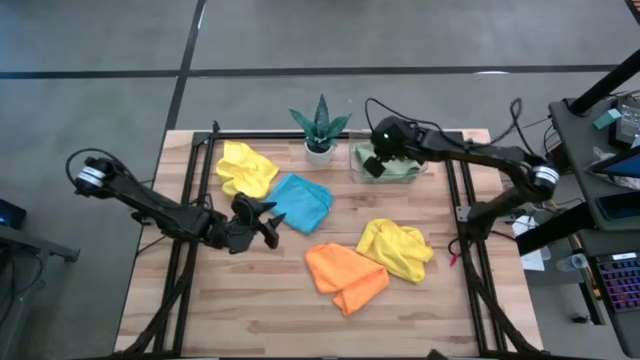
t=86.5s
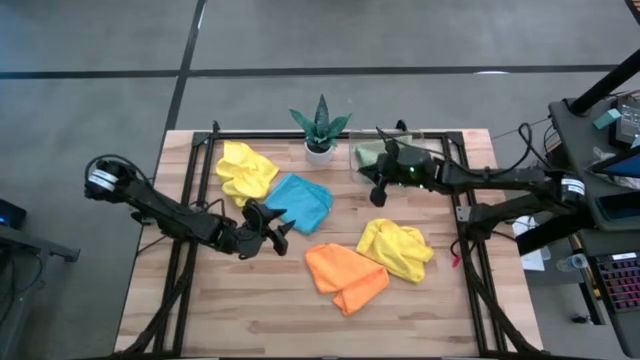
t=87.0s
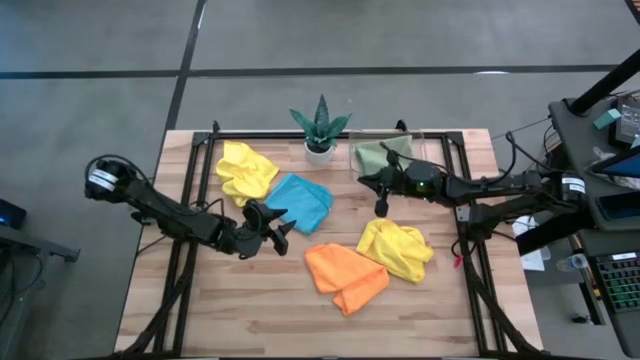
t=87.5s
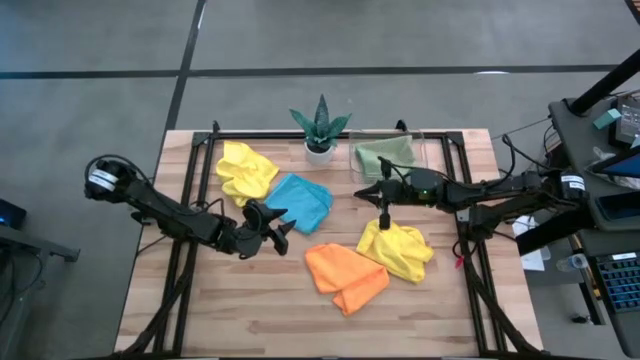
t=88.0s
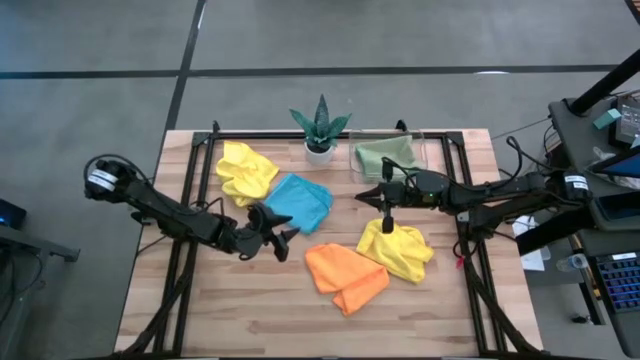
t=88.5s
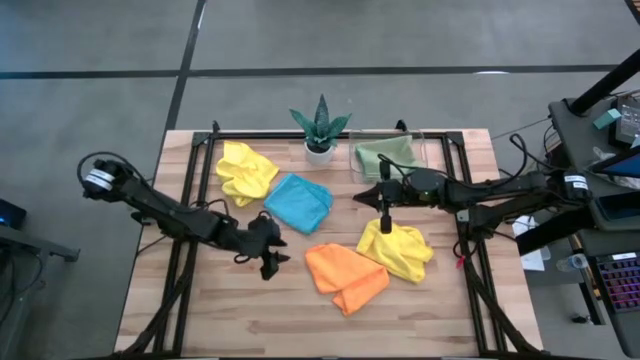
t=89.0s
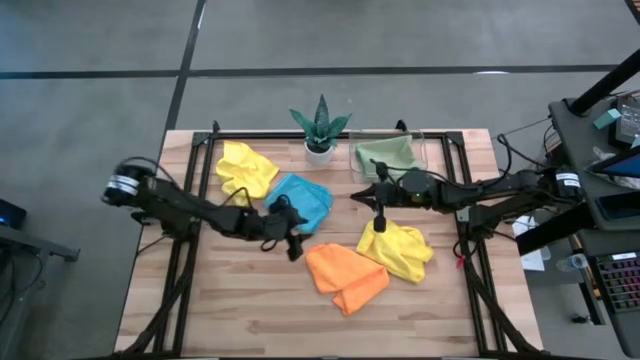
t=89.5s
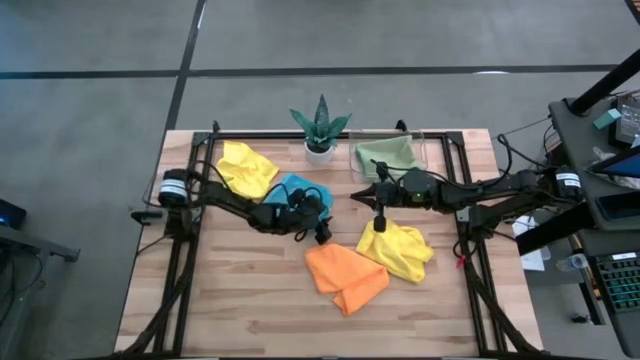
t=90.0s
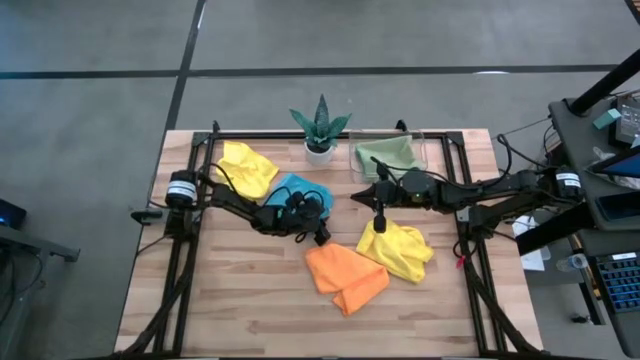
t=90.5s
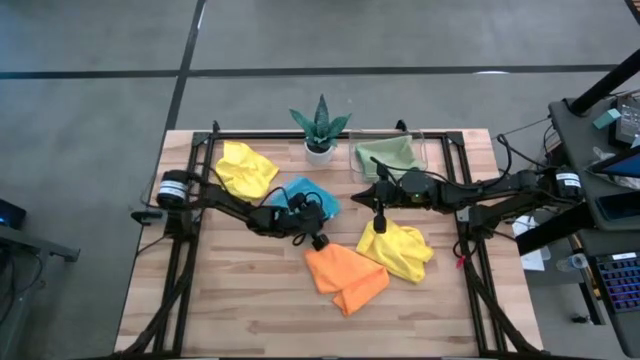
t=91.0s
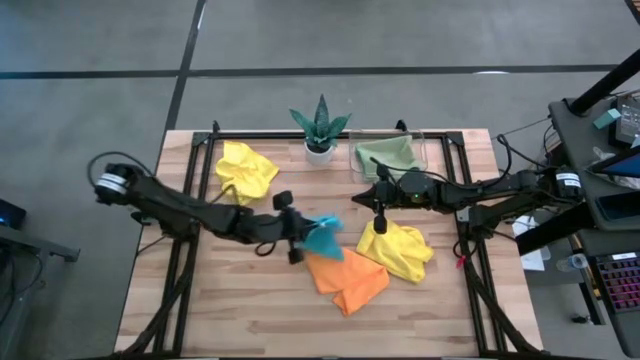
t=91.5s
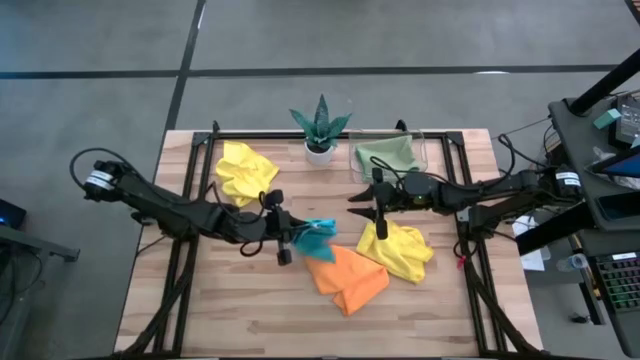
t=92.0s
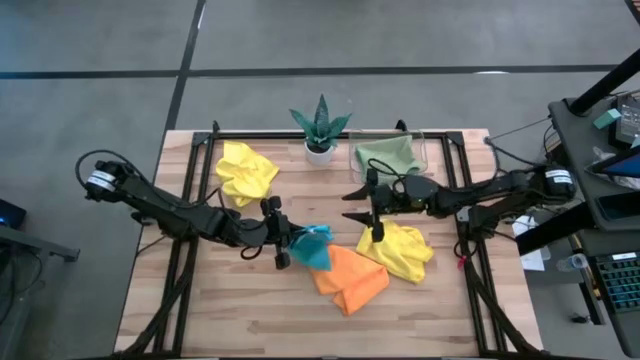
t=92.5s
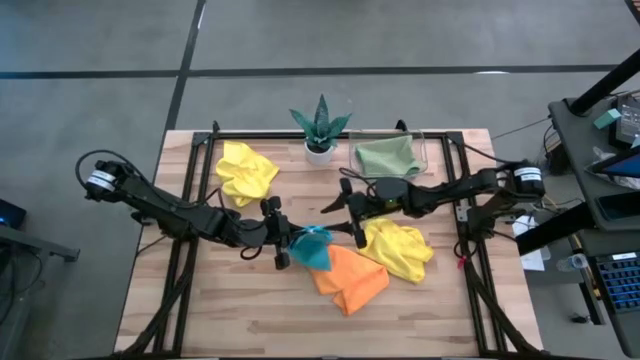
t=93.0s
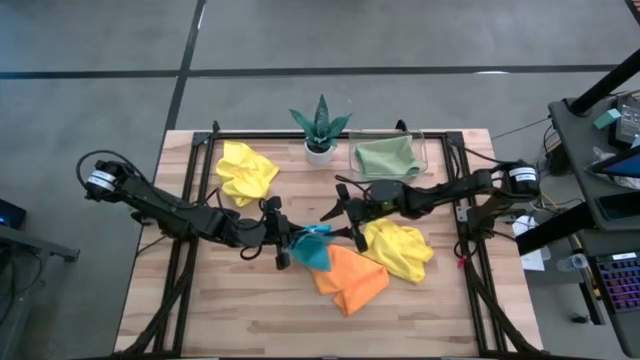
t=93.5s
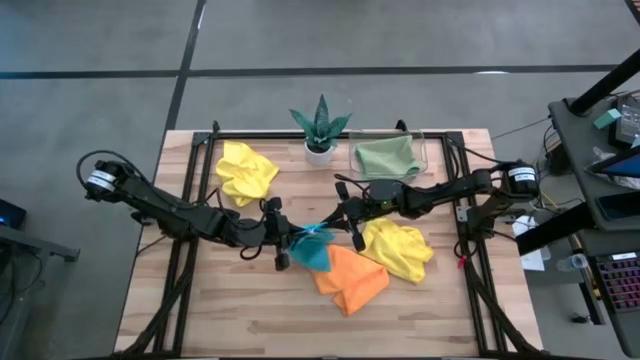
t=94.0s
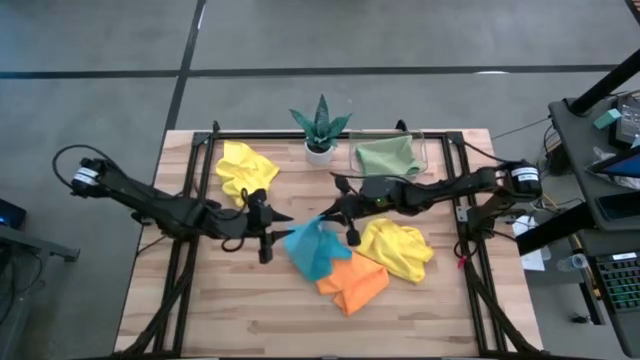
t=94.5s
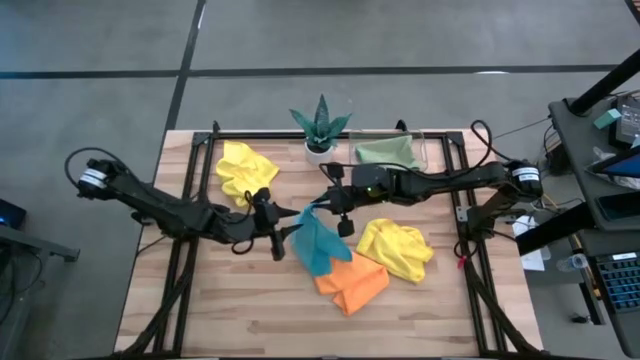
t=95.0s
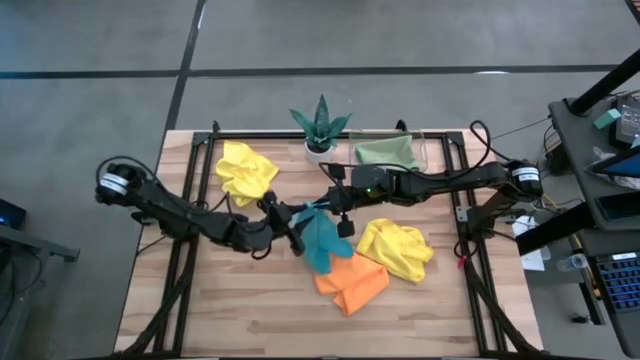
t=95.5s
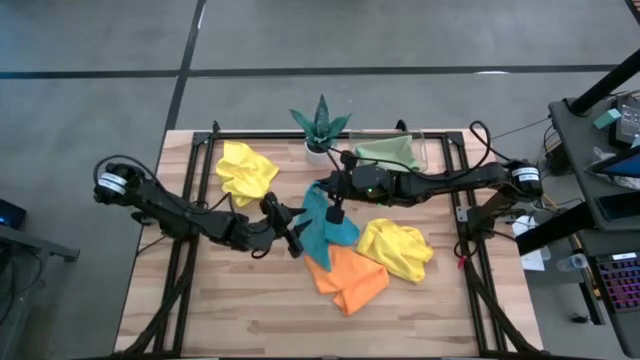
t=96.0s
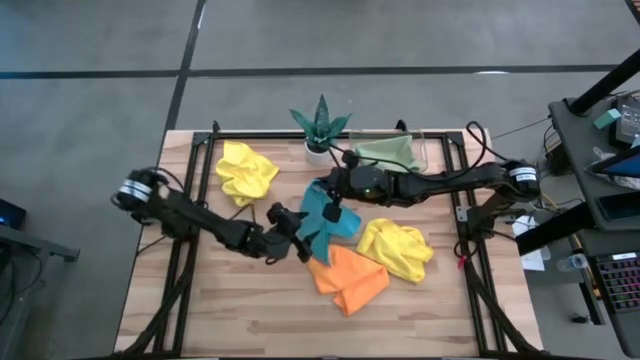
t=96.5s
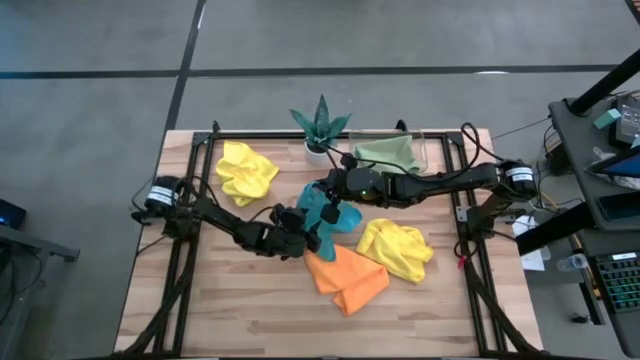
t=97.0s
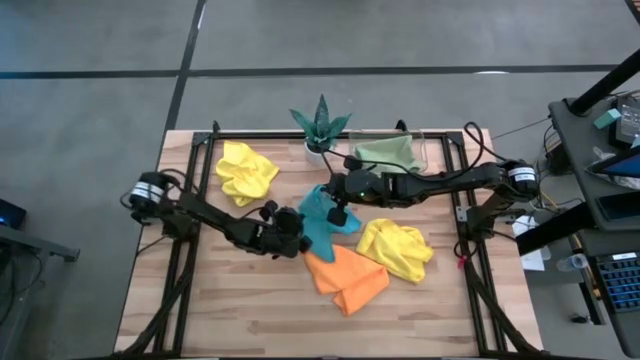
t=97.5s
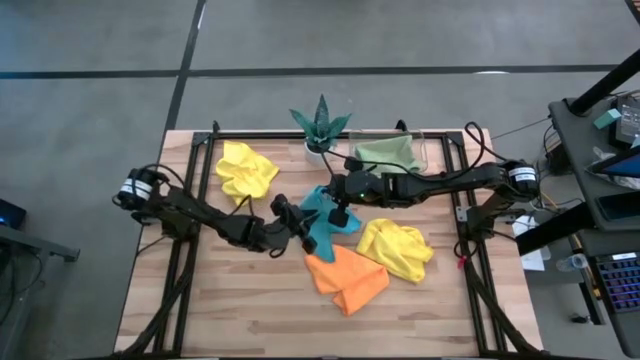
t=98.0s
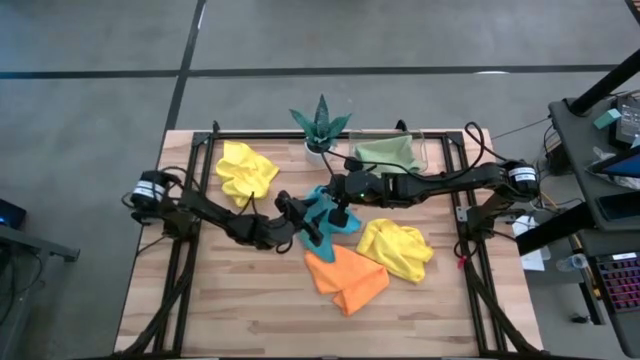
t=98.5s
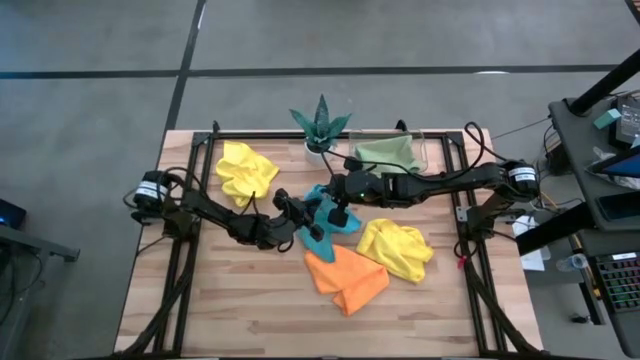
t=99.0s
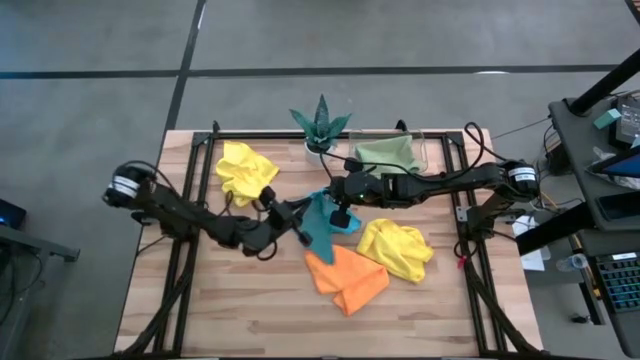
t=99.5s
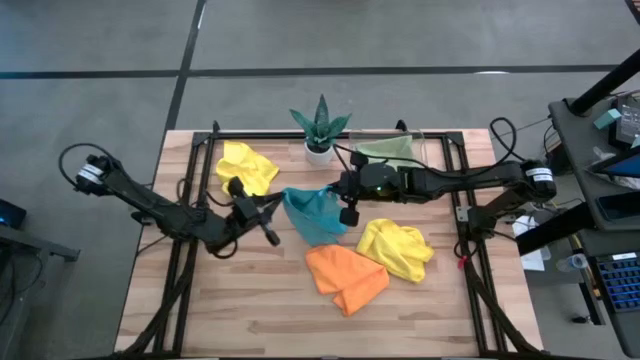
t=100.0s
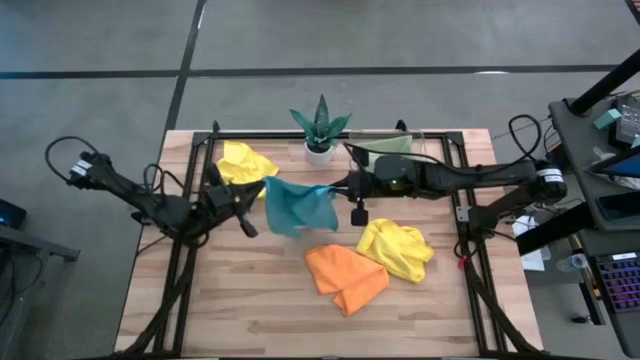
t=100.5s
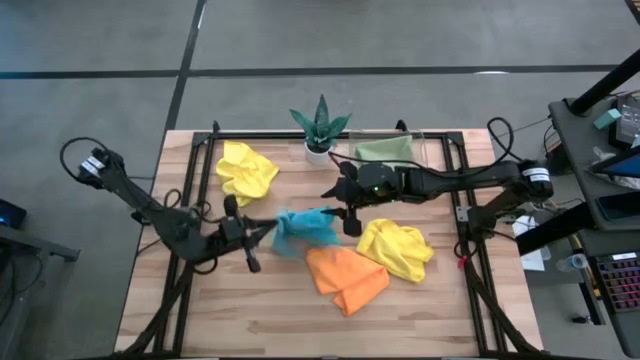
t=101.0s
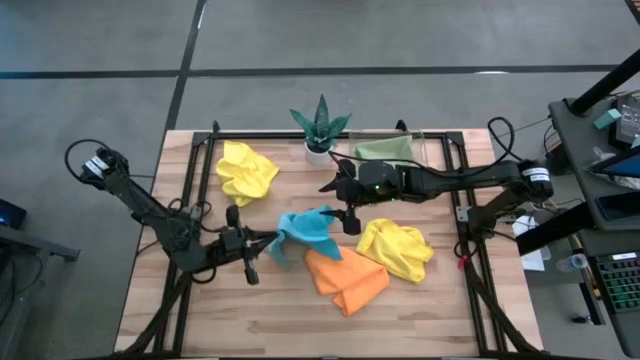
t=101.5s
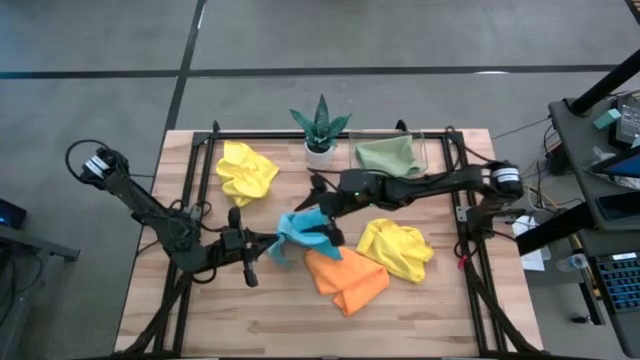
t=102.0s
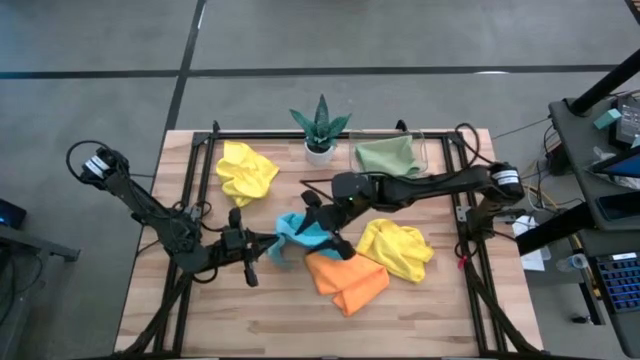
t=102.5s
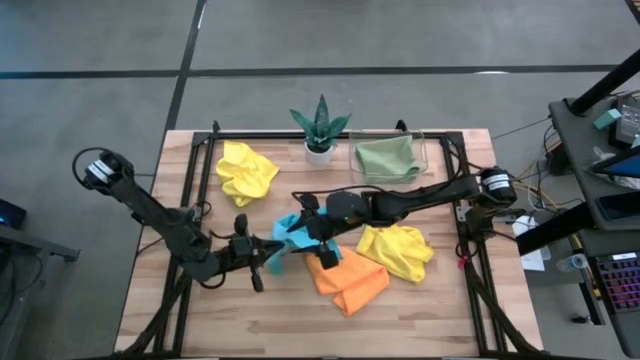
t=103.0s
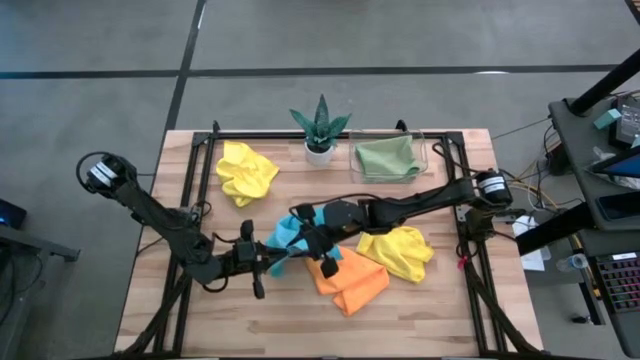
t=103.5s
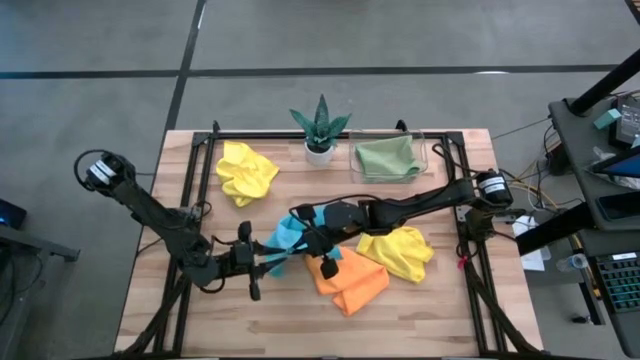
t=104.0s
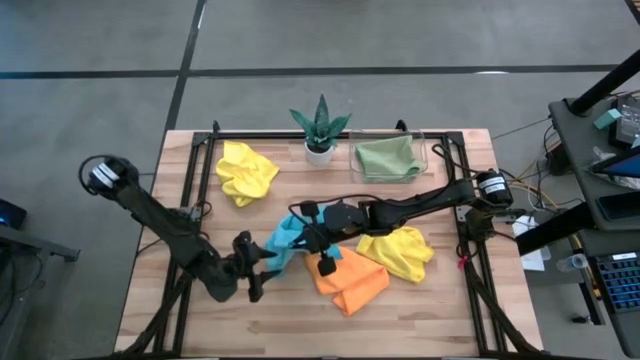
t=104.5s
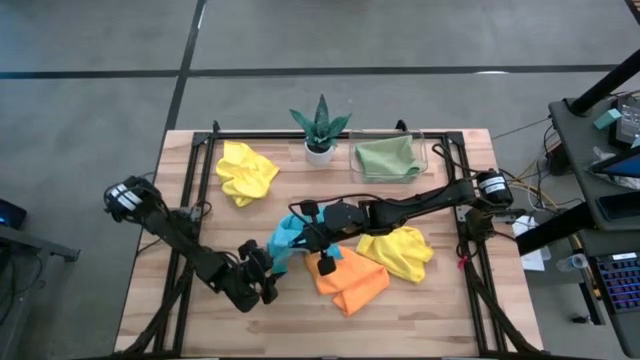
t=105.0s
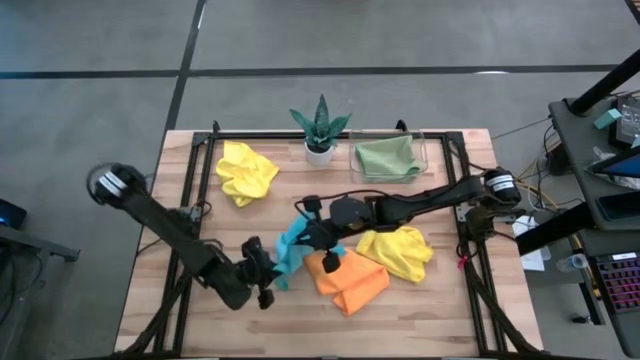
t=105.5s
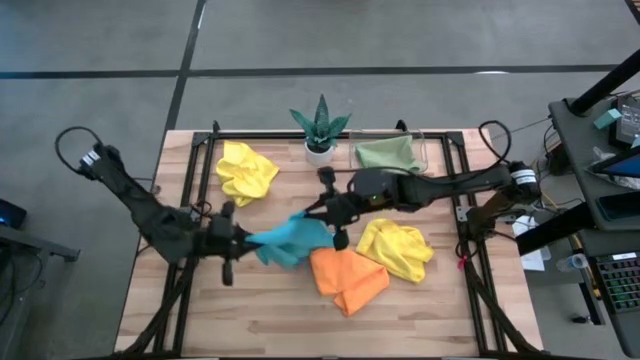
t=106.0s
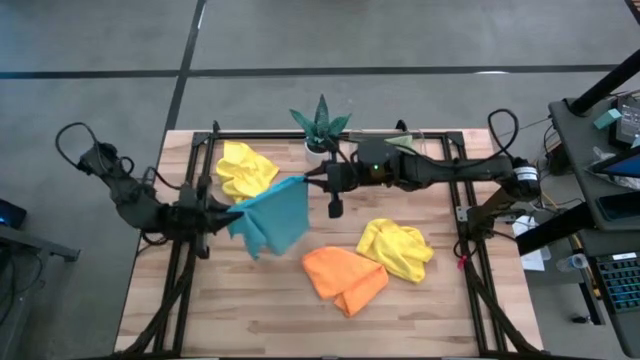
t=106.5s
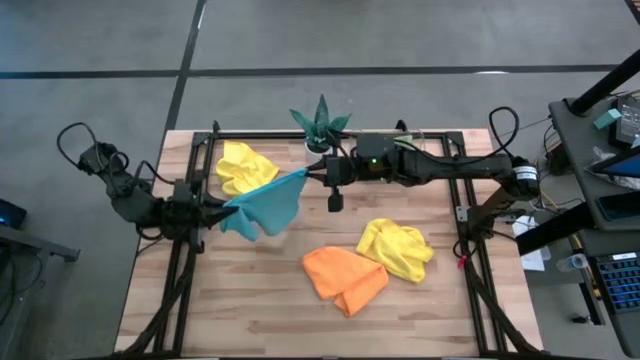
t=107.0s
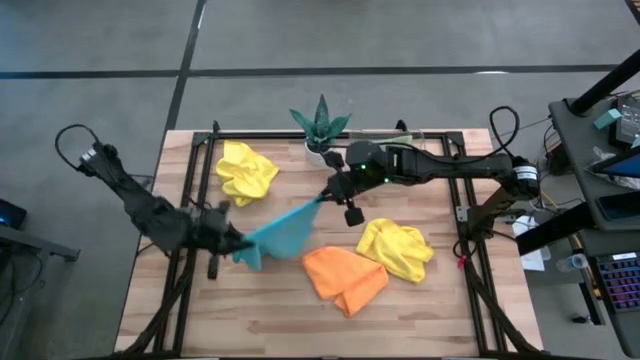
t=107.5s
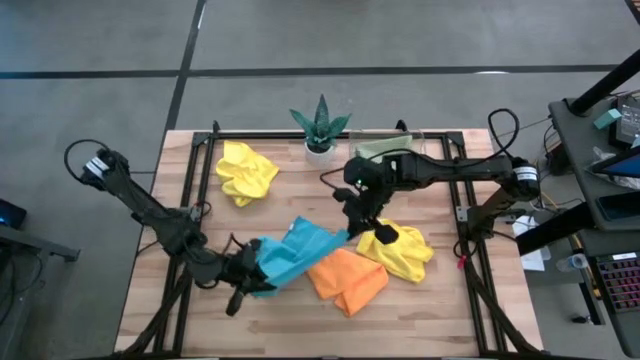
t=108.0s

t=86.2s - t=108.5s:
Task: Fold microfiber towels
Prepare the blue microfiber towel
